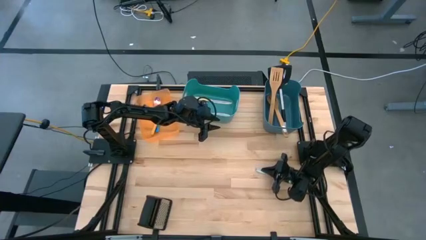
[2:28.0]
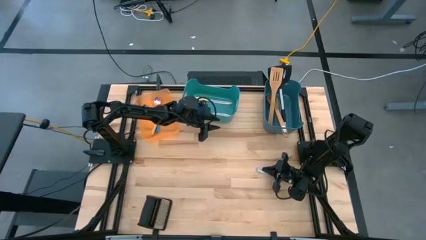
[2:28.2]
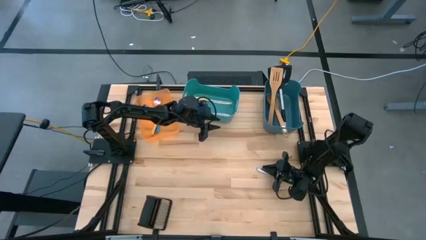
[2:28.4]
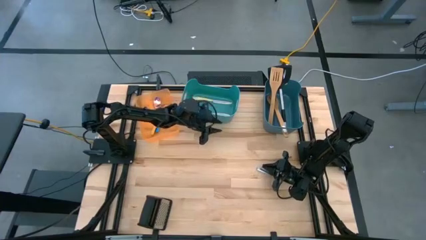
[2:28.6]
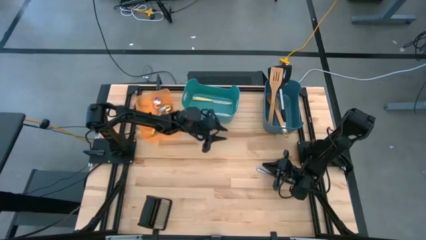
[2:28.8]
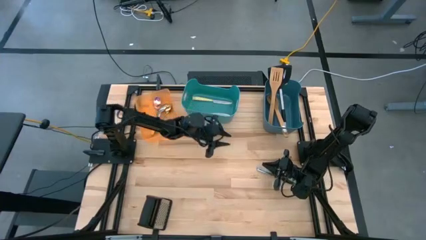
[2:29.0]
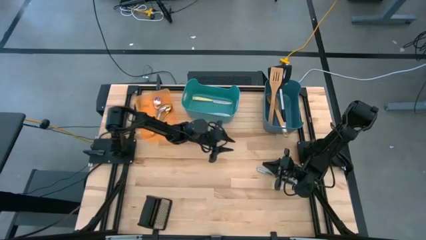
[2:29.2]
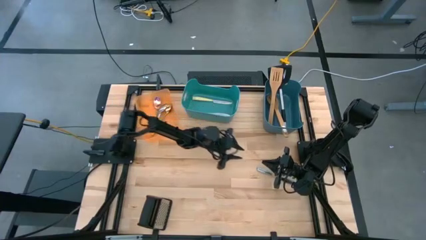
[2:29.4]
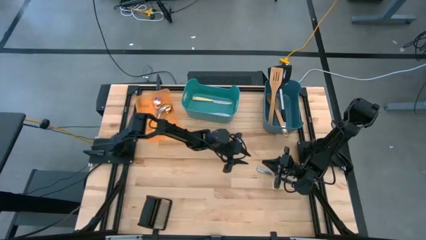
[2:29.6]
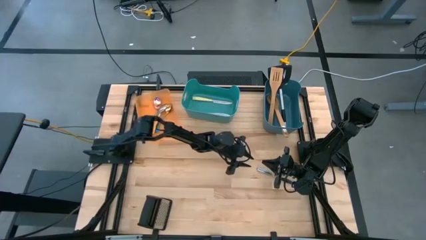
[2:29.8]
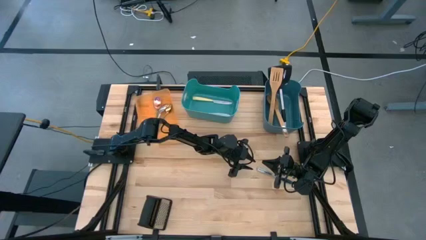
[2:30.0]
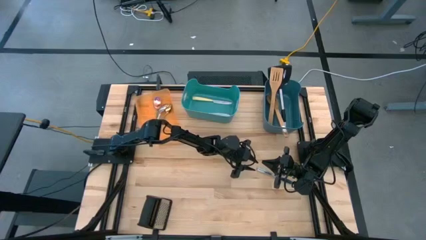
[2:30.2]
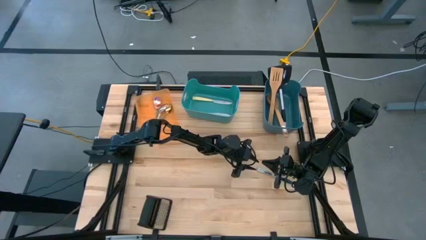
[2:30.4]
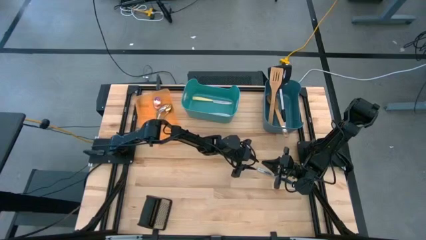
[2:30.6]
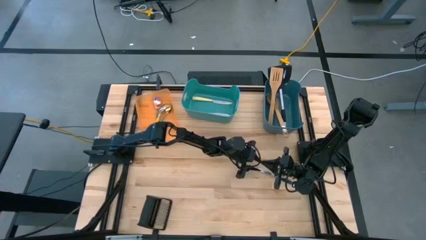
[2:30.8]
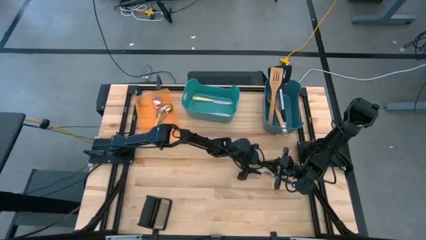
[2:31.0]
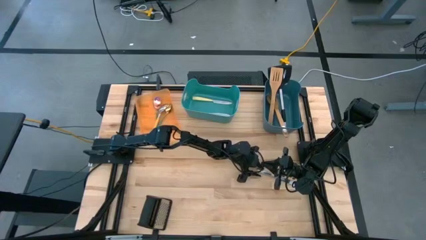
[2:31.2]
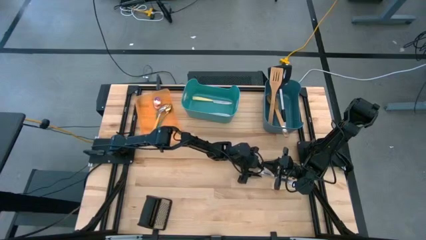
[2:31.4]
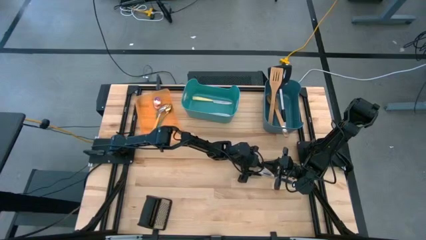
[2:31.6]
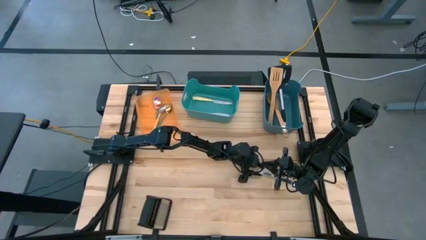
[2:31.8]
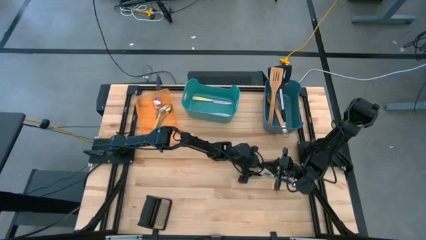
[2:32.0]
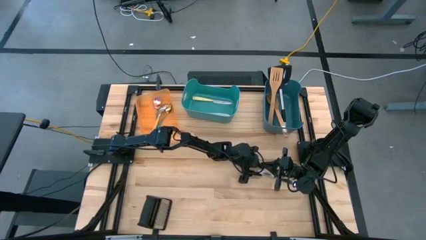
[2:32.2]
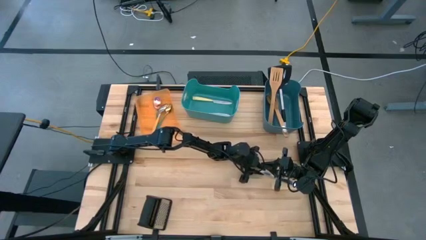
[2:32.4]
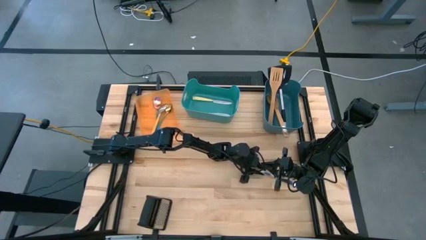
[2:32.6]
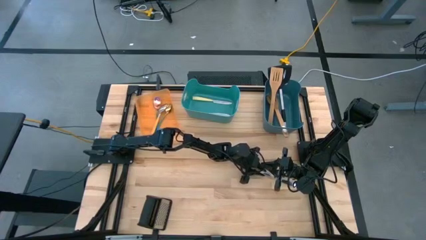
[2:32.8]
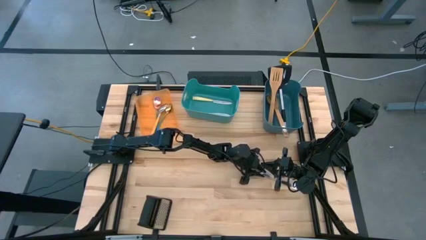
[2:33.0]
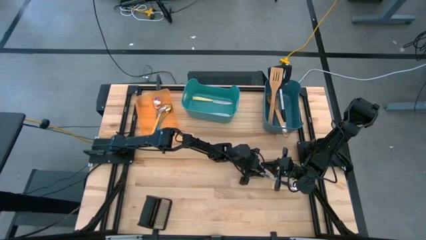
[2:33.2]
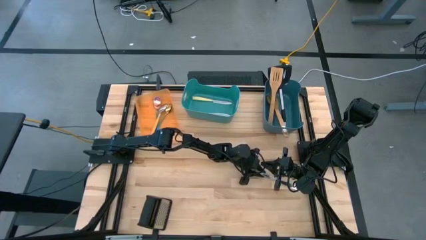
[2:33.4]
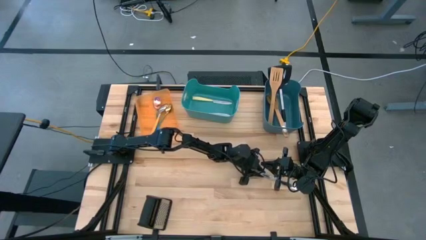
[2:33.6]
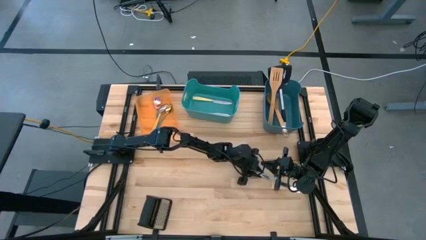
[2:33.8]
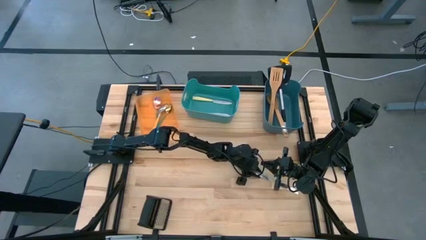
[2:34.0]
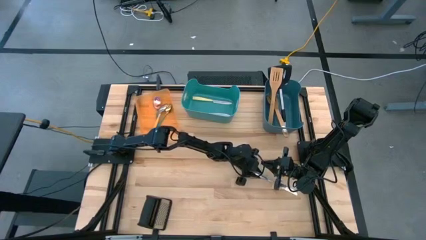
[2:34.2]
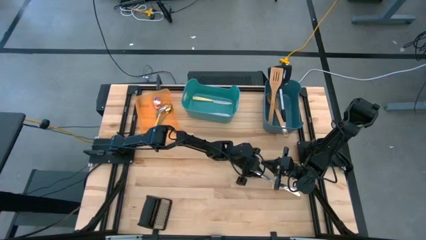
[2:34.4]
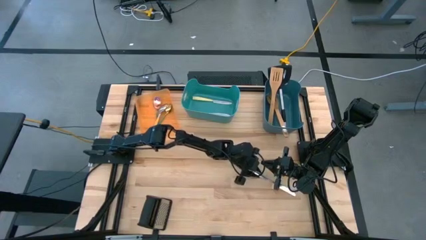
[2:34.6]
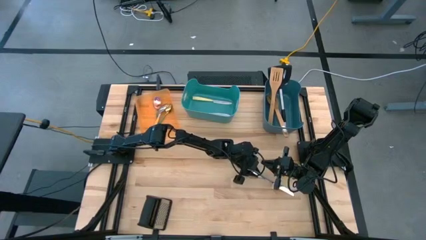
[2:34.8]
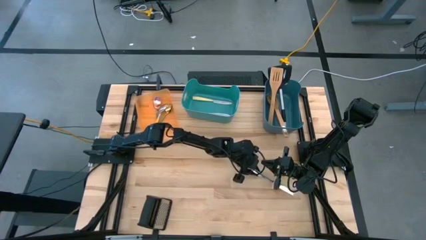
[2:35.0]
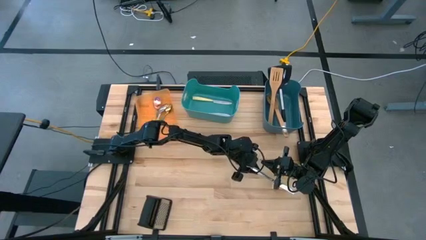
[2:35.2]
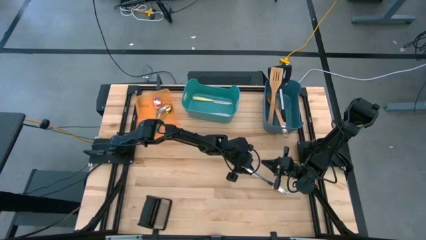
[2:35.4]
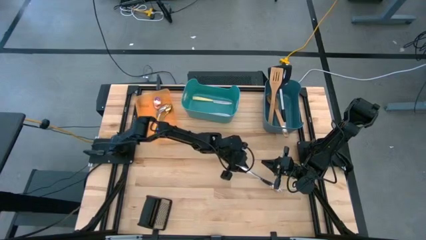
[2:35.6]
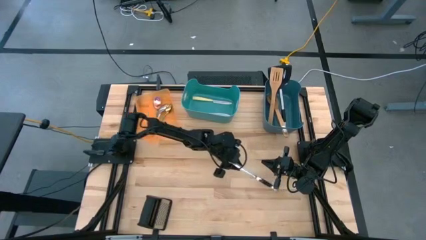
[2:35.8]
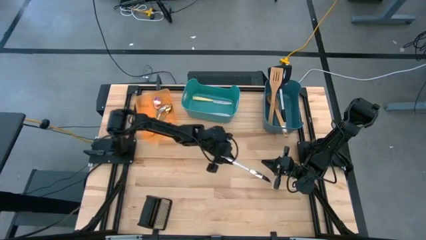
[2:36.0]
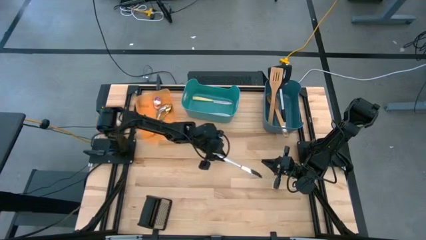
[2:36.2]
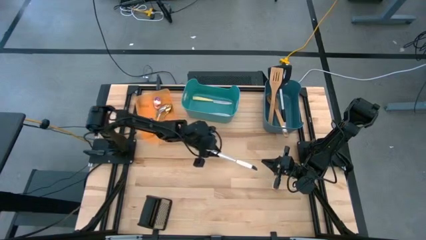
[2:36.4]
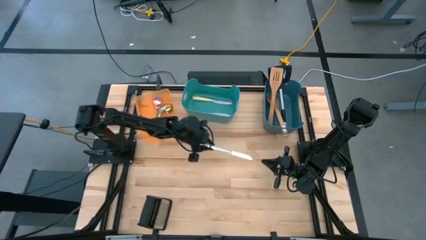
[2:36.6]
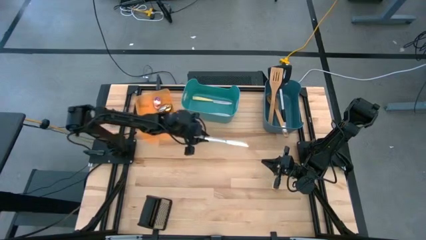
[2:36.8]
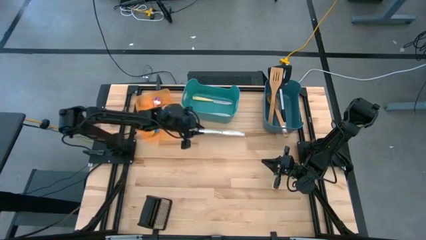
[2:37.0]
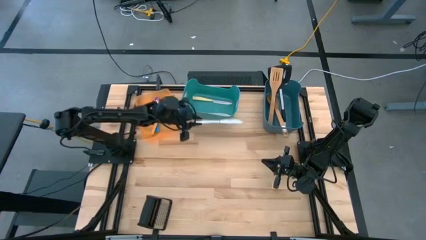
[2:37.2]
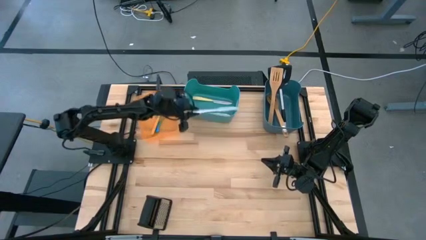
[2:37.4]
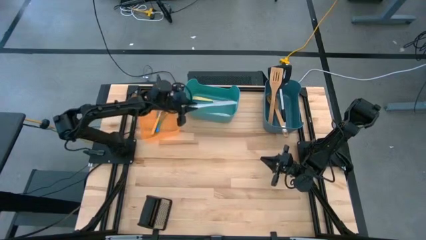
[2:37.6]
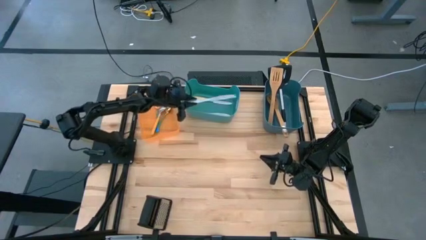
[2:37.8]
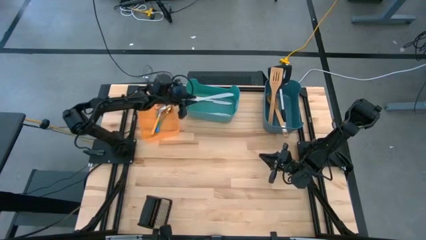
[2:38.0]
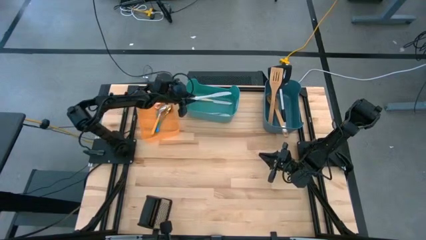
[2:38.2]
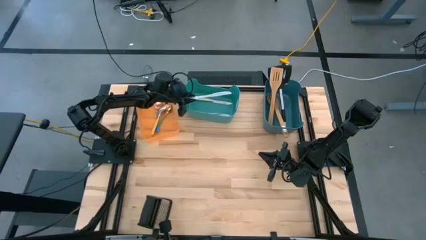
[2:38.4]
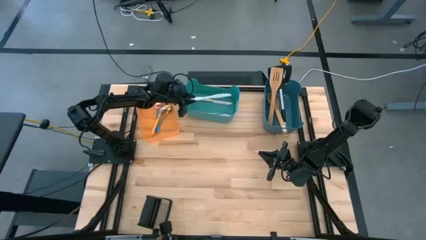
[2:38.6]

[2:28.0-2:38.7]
Task: Pick & Place Kitchen Items
Put the silver knife into the green bin

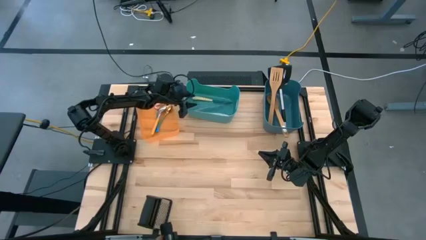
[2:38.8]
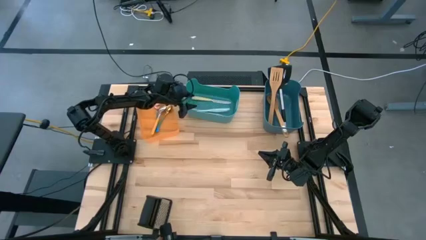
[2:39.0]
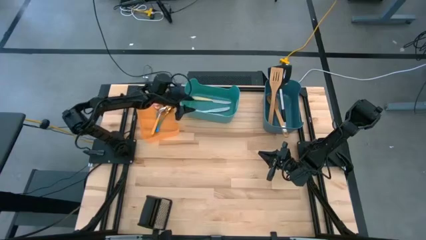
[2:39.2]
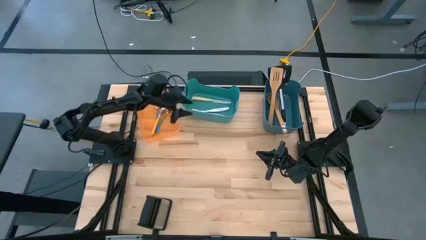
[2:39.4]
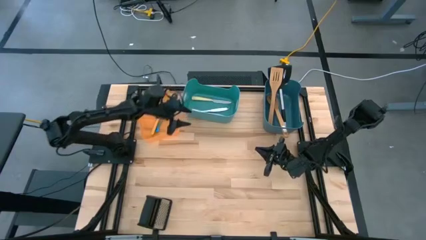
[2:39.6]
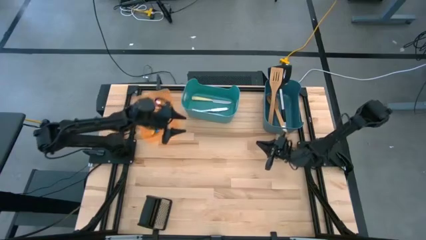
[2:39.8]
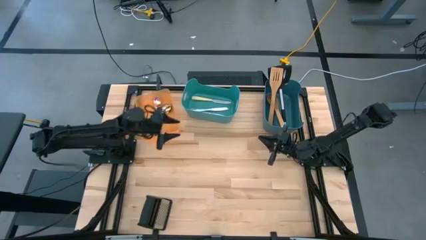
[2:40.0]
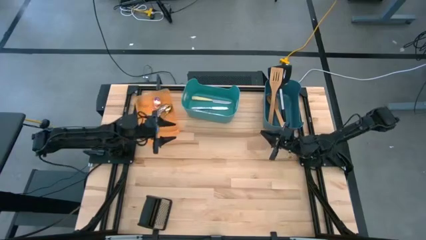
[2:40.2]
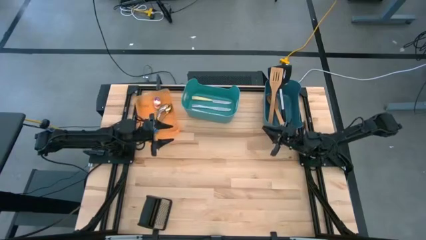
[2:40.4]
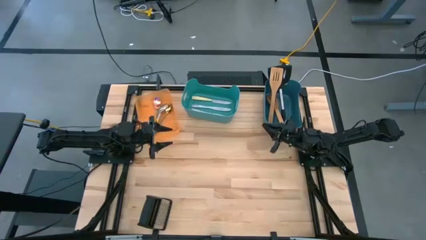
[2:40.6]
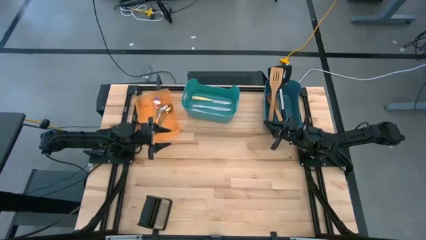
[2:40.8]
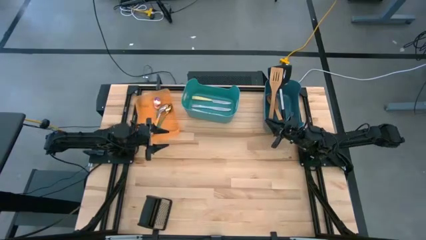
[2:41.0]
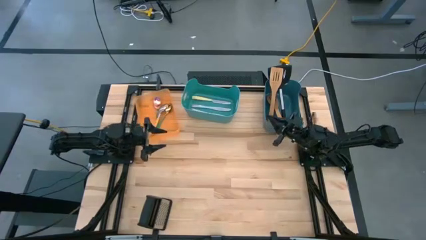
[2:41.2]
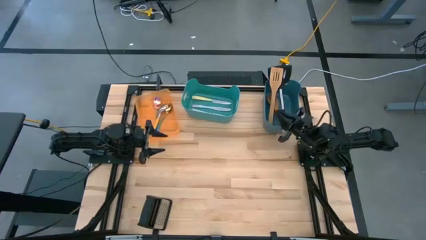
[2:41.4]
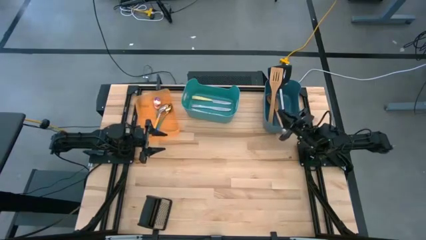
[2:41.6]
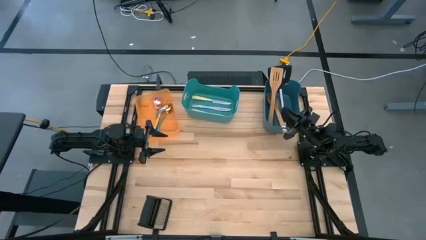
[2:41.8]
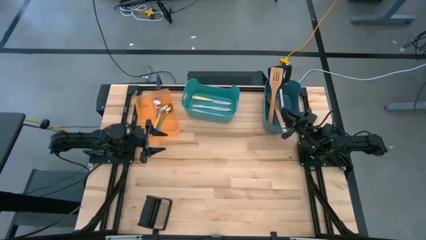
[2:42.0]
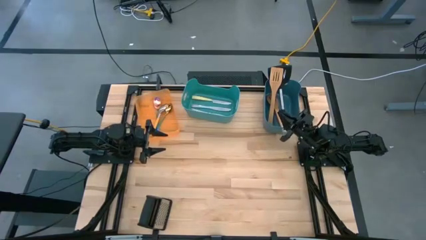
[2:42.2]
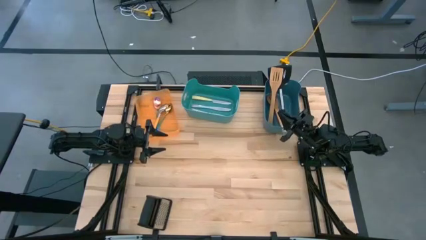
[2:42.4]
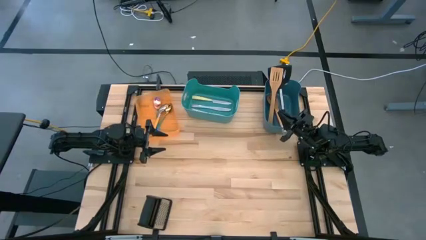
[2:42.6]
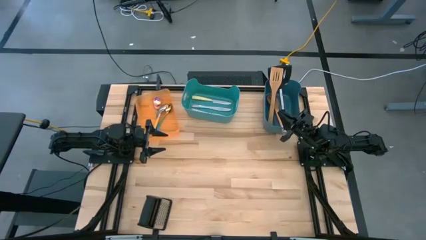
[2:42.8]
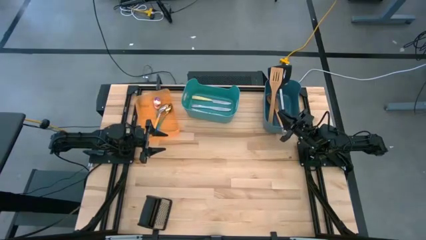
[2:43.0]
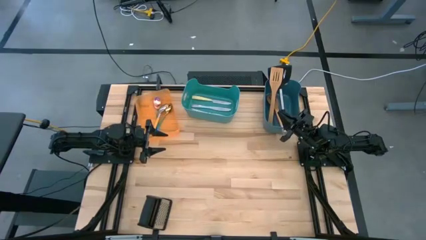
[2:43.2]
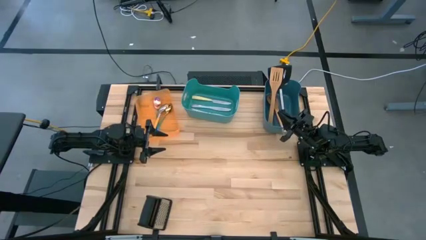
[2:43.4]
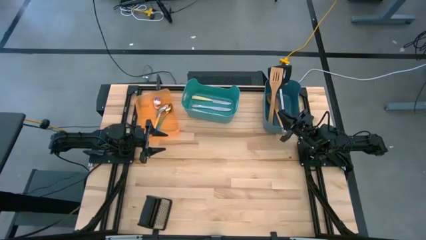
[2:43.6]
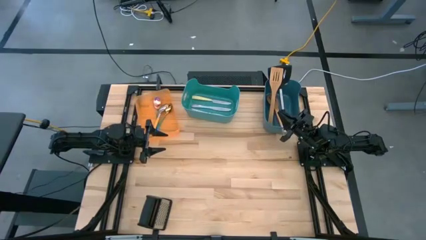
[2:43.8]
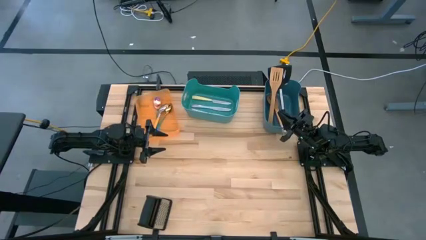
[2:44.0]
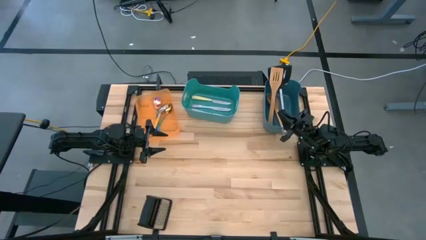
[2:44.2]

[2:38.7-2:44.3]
Return to Home Position
